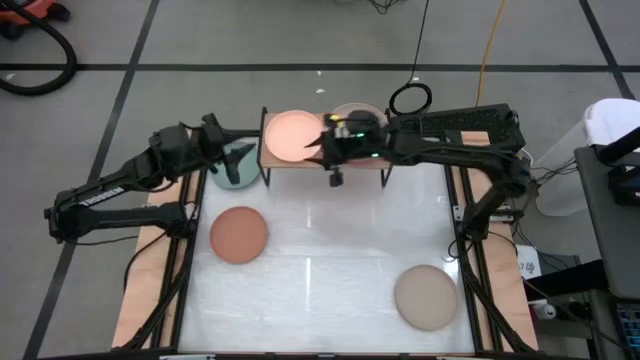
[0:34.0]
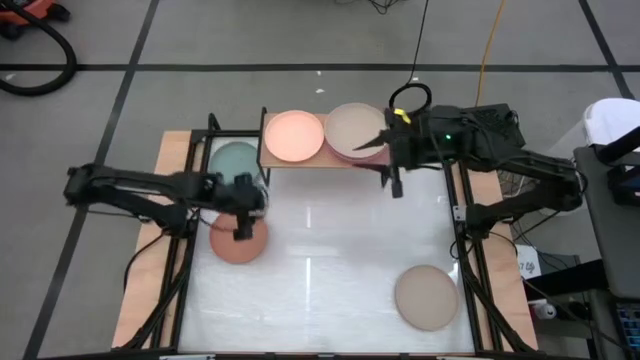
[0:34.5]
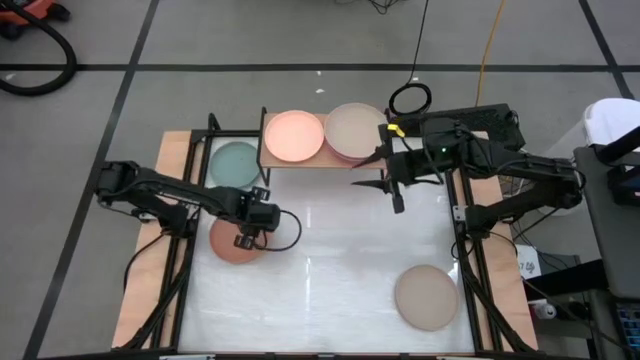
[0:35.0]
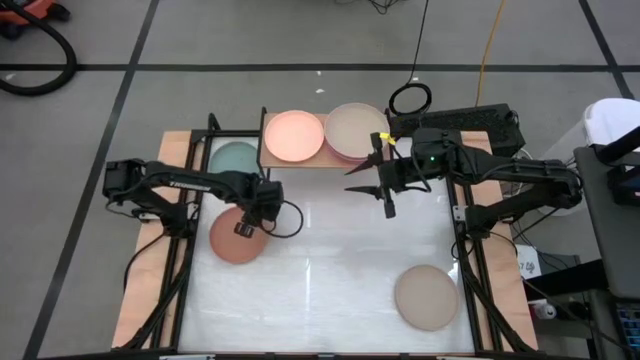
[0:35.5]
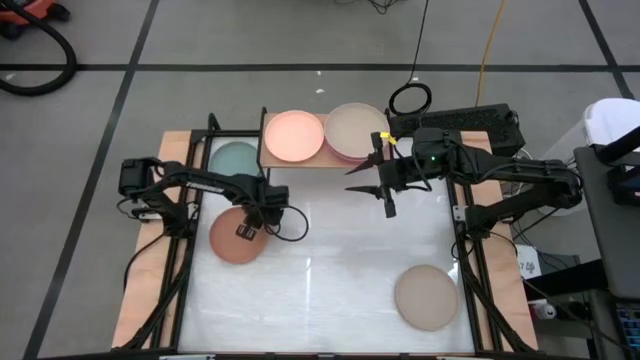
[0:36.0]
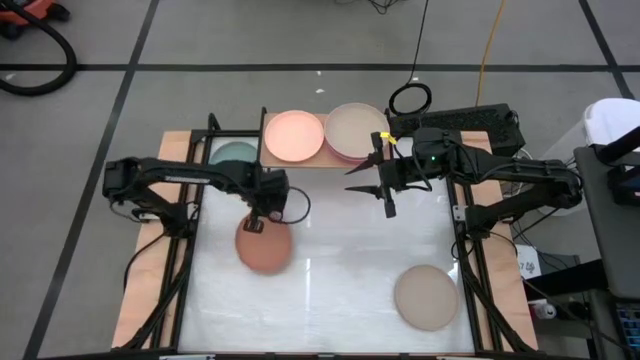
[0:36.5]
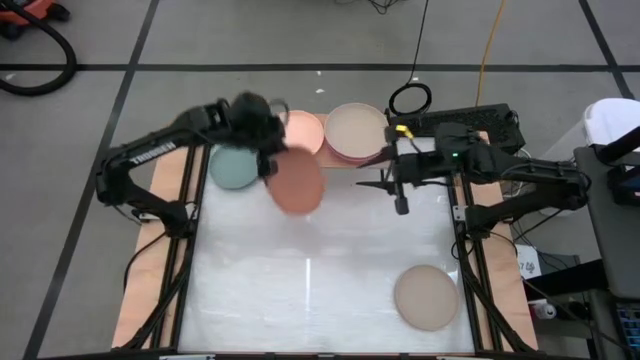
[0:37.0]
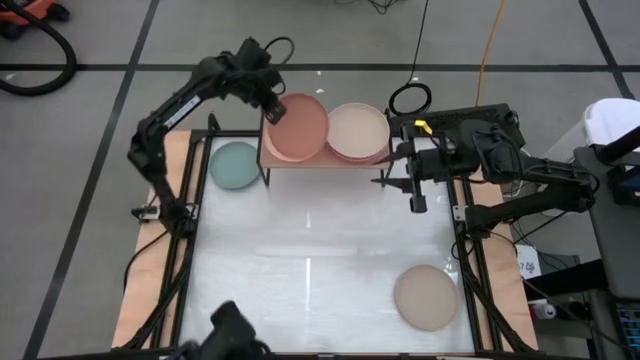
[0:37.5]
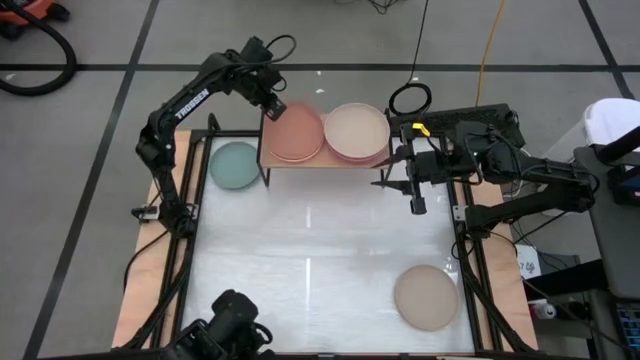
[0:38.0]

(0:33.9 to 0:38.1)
Task: Place and stack plates onto a shelf
Stack the brown plate on the light orange plate on the shelf

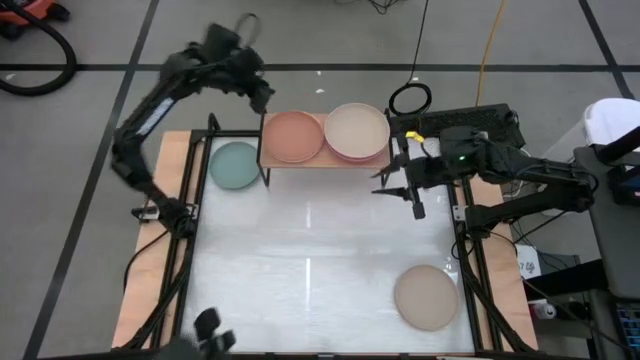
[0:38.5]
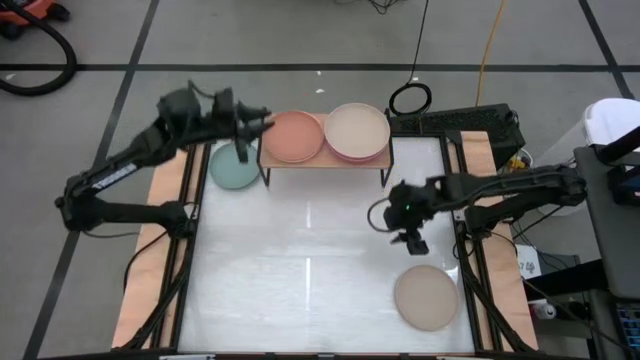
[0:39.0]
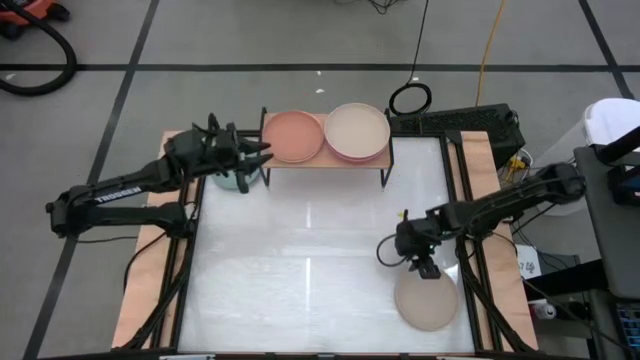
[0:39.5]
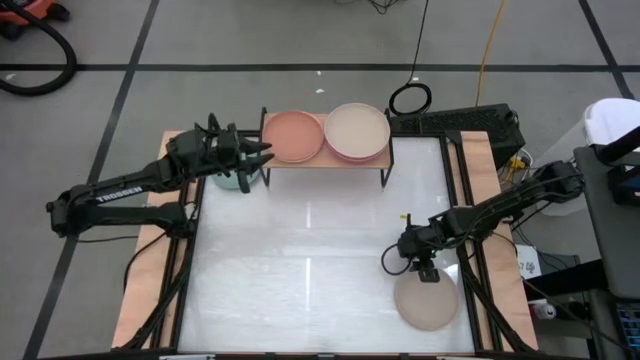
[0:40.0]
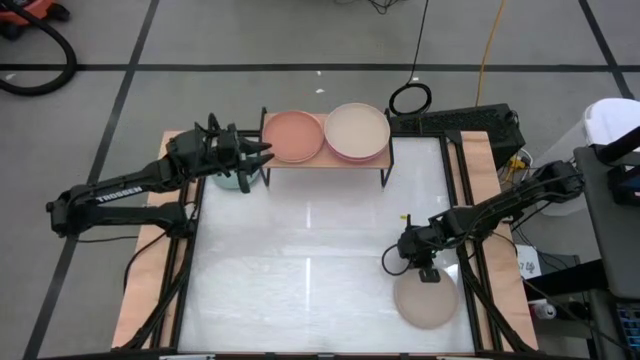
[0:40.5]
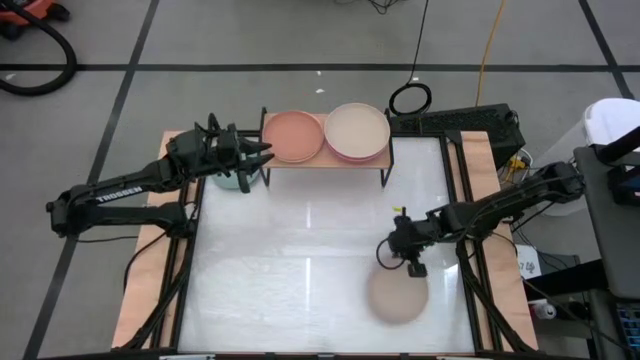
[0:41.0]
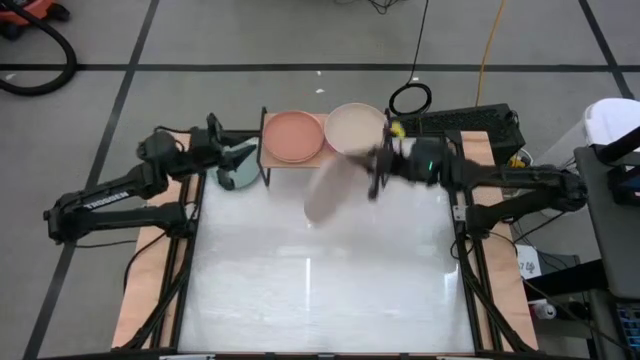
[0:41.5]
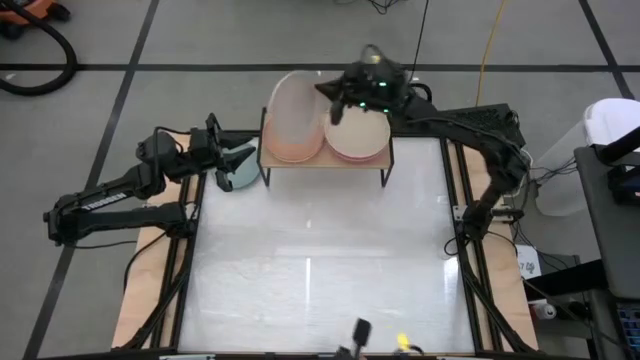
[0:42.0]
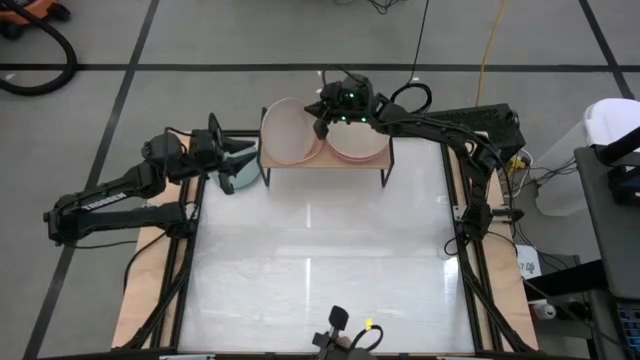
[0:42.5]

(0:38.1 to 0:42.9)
Stack the gray plate on the brown plate on the shelf

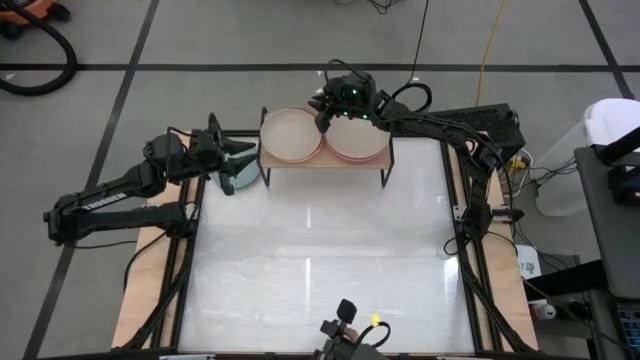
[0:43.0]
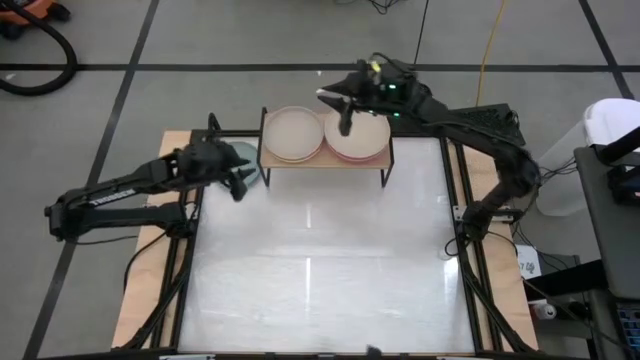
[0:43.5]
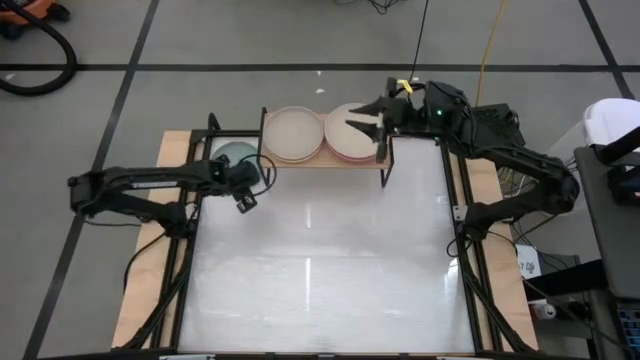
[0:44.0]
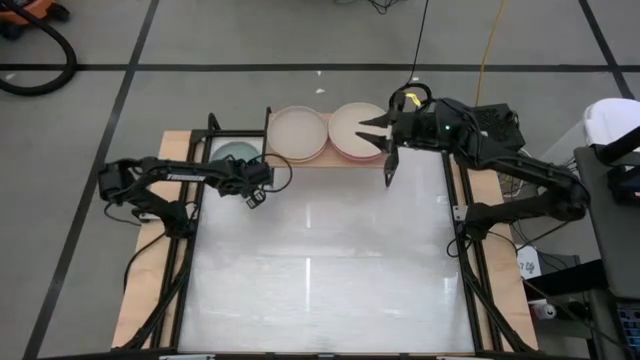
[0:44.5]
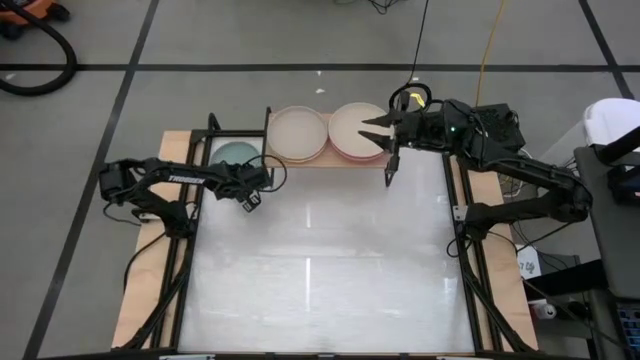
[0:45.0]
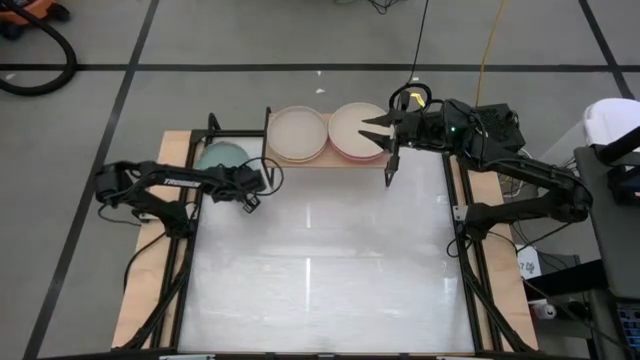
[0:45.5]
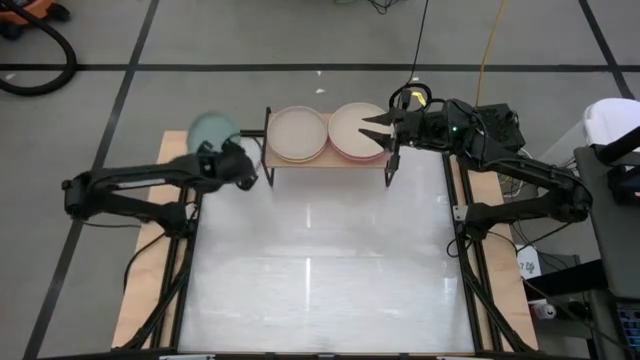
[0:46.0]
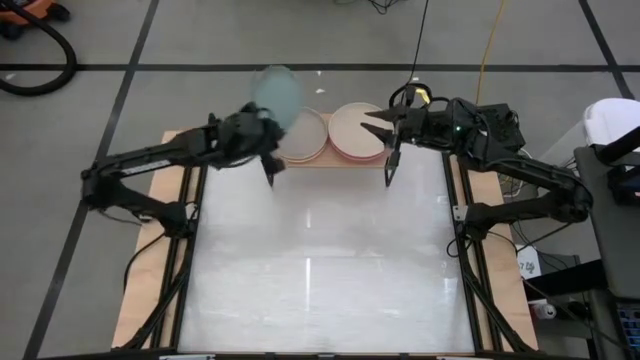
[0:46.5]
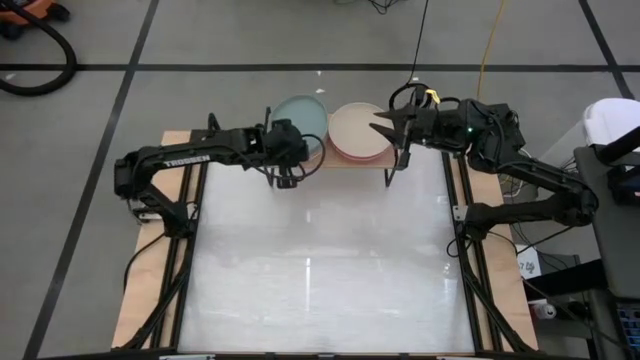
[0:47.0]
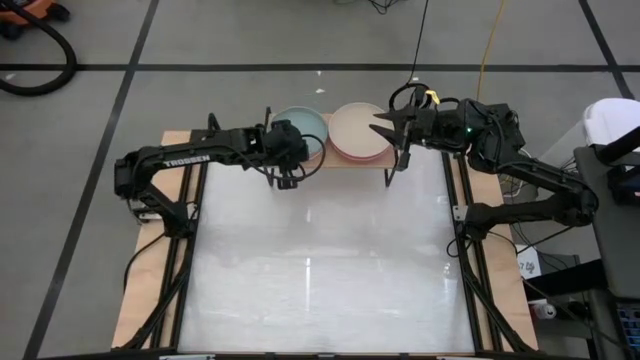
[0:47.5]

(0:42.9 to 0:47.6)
Stack the blue plate on the gray plate on the shelf

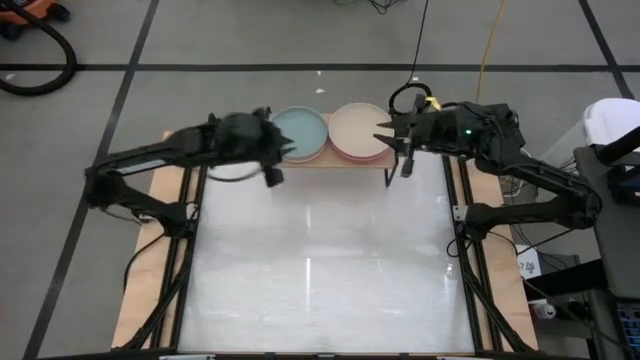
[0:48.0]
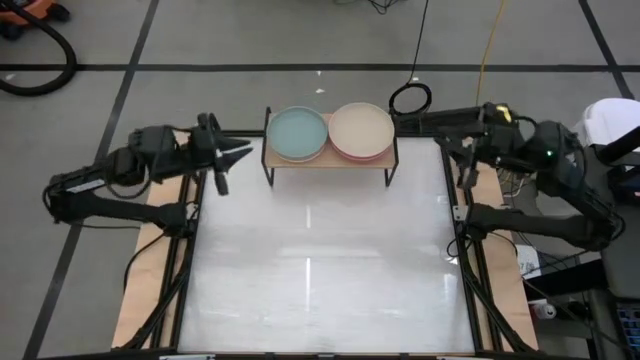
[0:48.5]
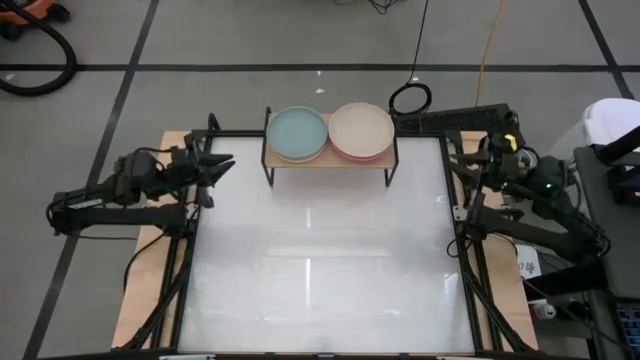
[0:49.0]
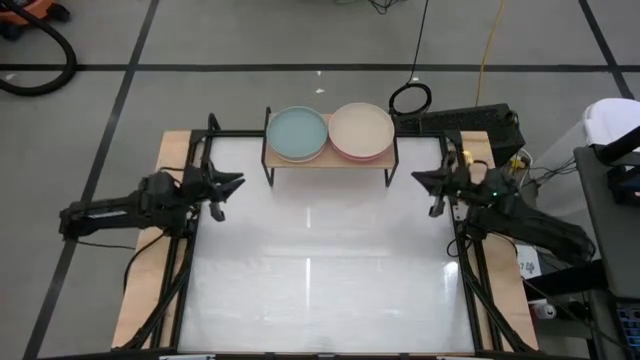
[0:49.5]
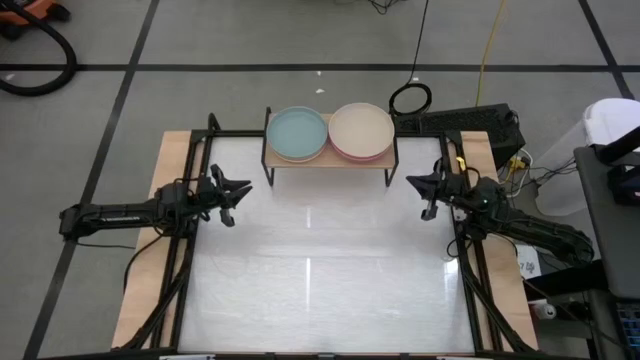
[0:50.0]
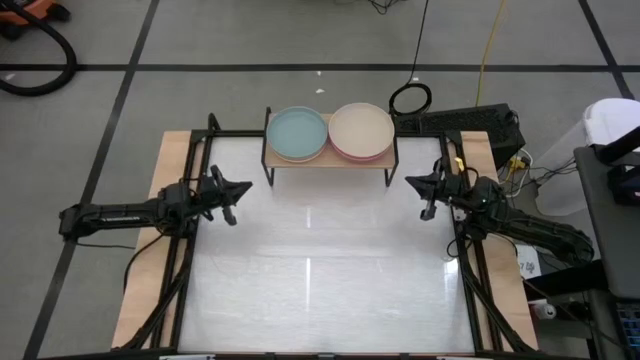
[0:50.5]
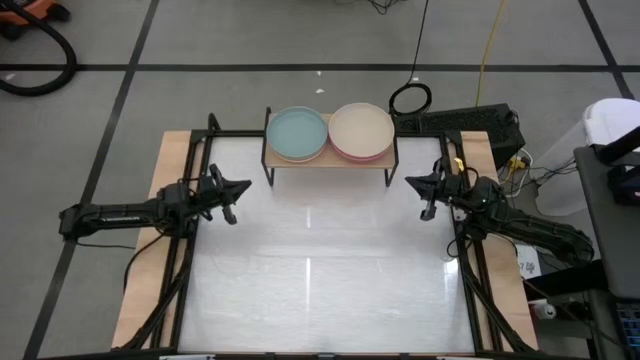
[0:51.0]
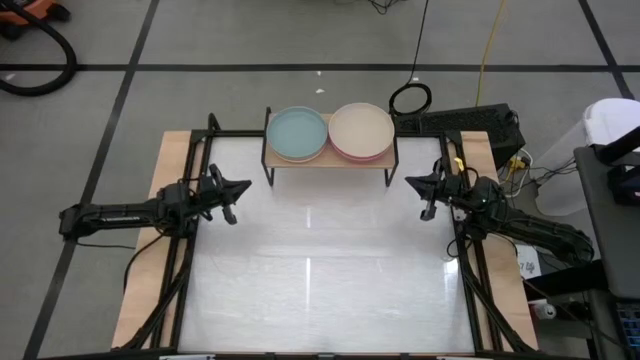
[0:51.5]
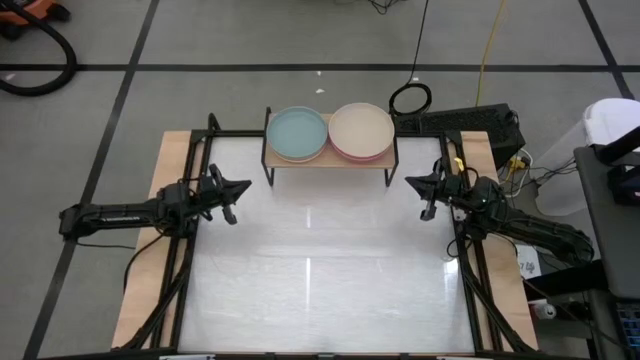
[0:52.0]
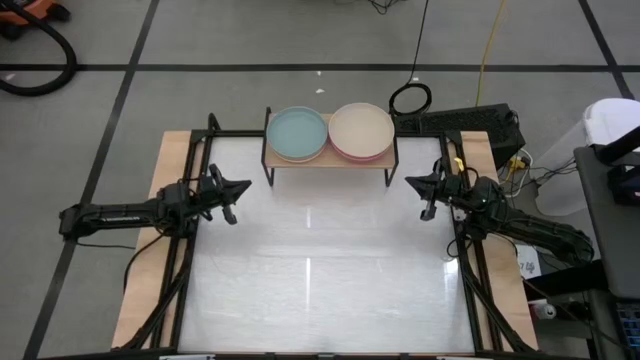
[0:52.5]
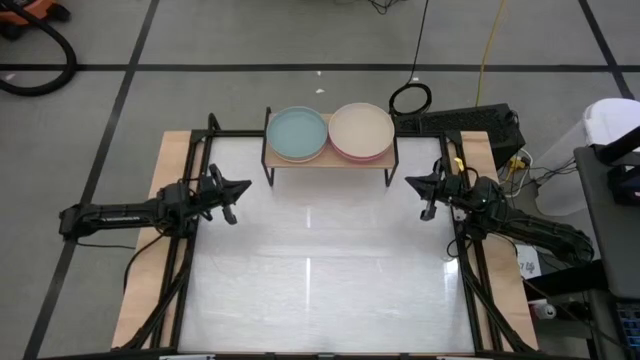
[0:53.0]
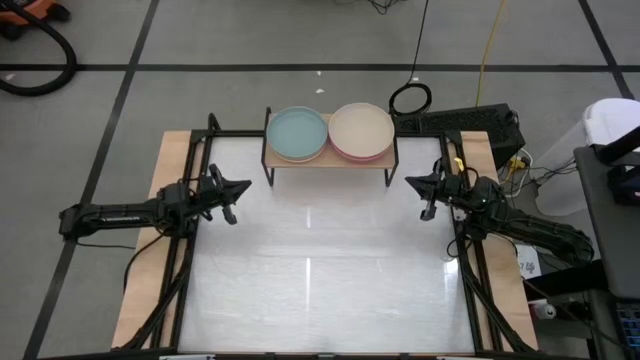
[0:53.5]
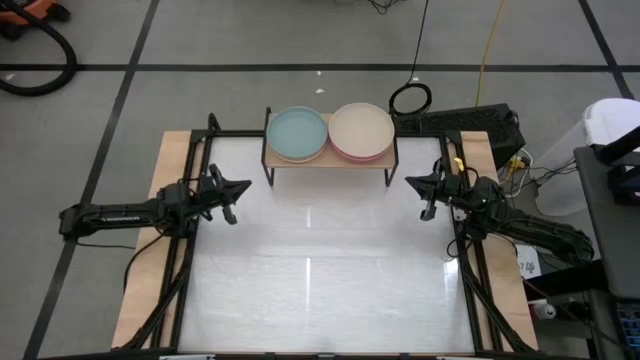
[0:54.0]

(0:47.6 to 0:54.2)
Return to Home Position
